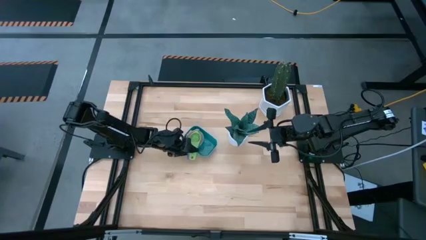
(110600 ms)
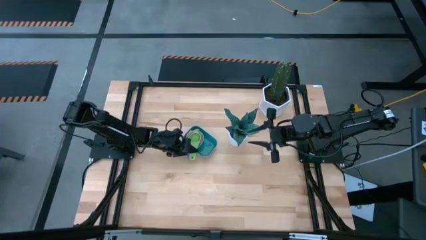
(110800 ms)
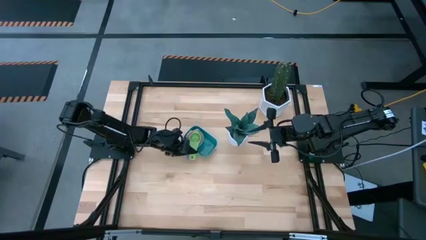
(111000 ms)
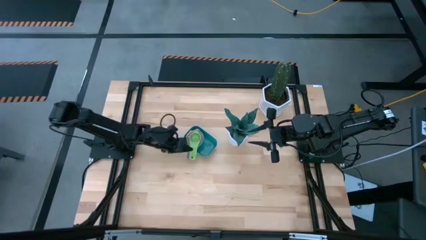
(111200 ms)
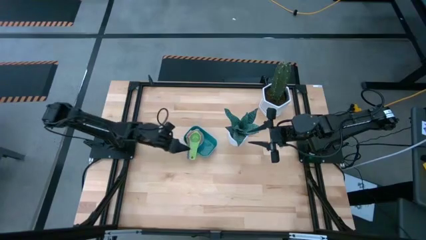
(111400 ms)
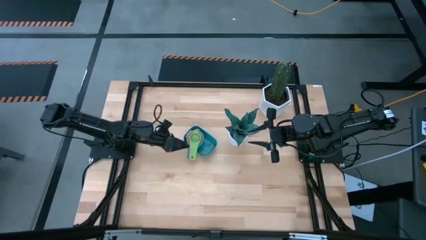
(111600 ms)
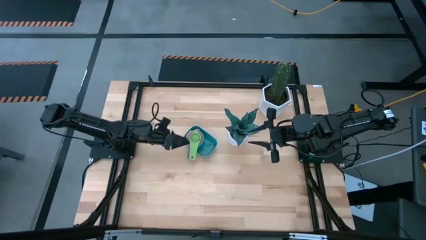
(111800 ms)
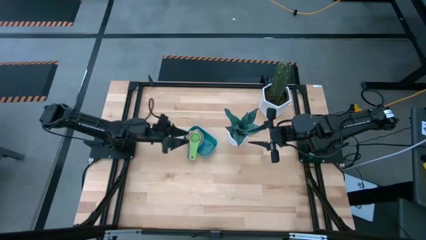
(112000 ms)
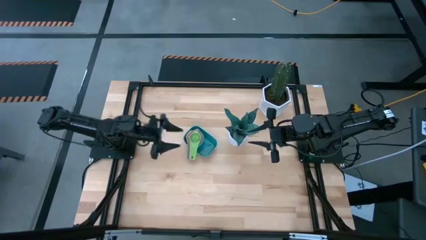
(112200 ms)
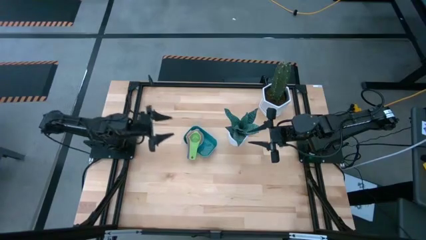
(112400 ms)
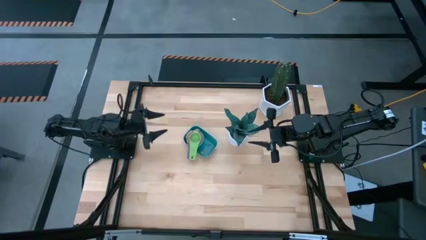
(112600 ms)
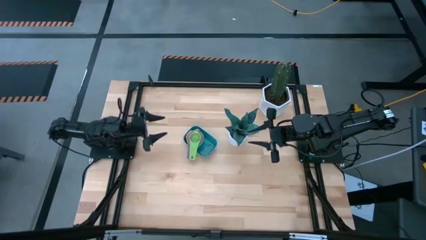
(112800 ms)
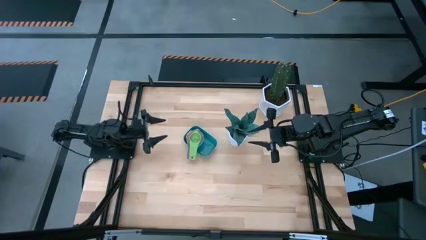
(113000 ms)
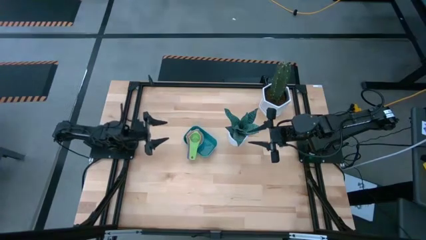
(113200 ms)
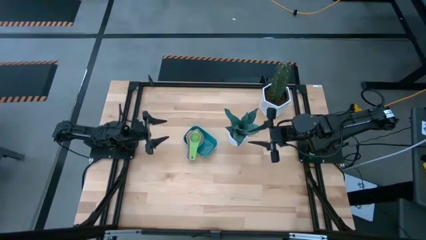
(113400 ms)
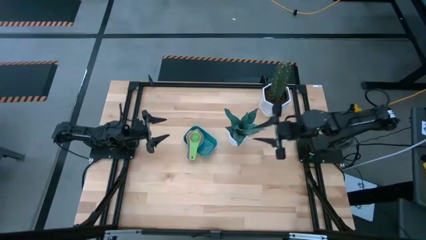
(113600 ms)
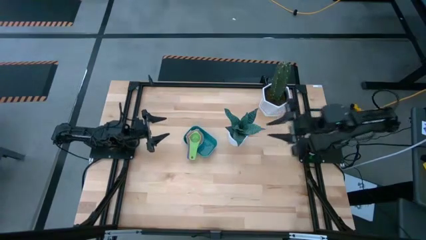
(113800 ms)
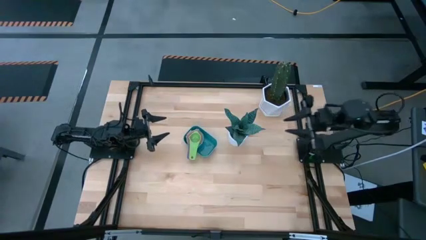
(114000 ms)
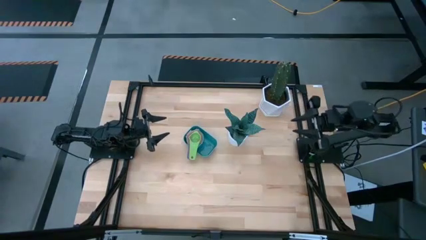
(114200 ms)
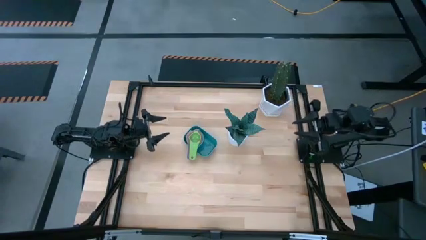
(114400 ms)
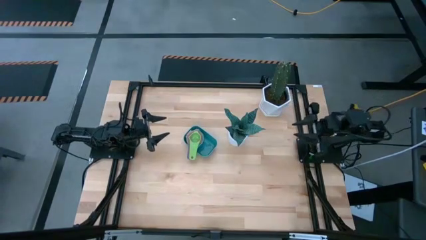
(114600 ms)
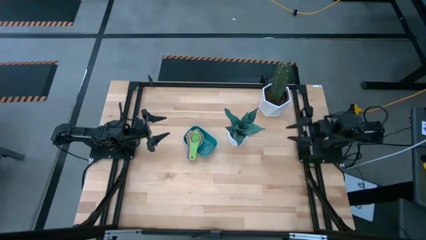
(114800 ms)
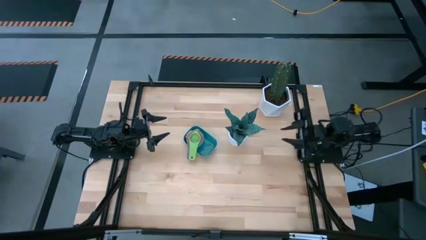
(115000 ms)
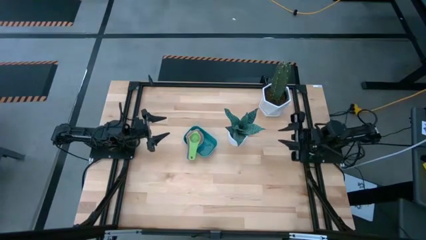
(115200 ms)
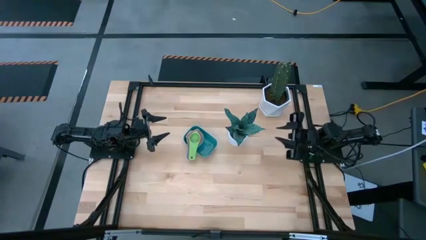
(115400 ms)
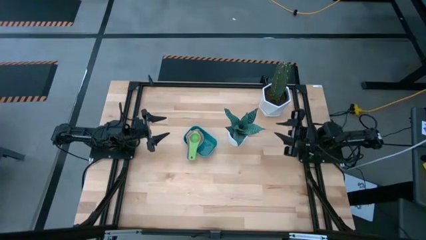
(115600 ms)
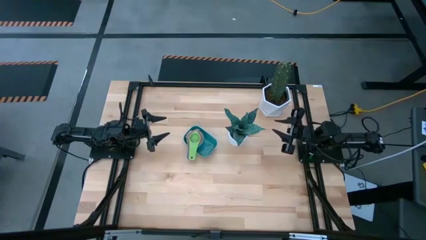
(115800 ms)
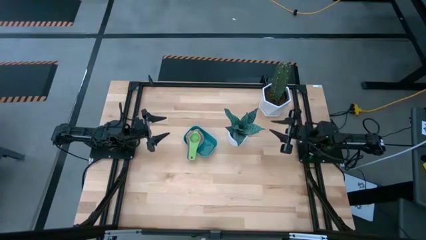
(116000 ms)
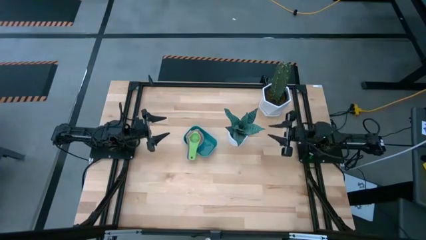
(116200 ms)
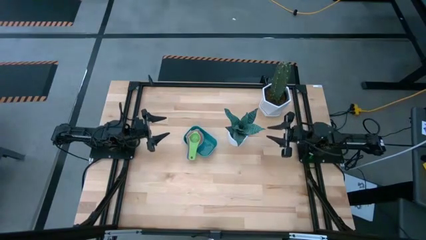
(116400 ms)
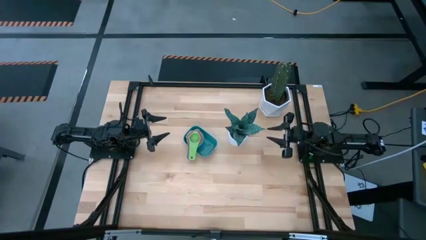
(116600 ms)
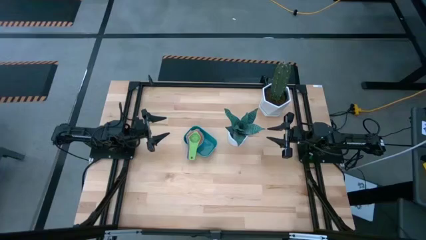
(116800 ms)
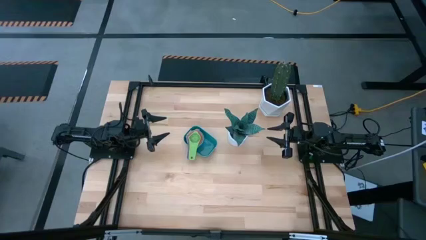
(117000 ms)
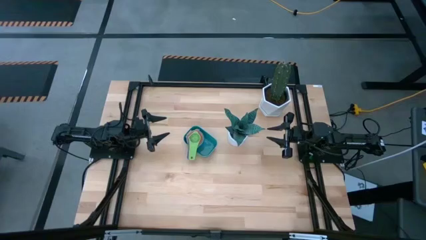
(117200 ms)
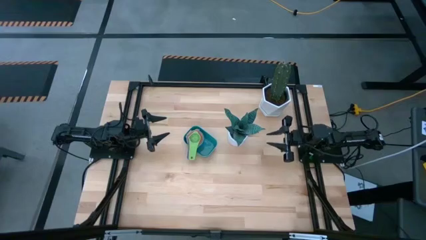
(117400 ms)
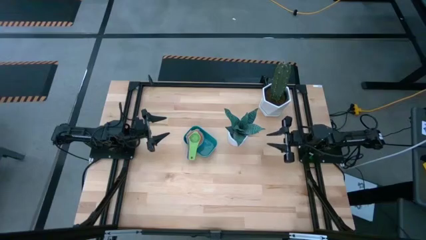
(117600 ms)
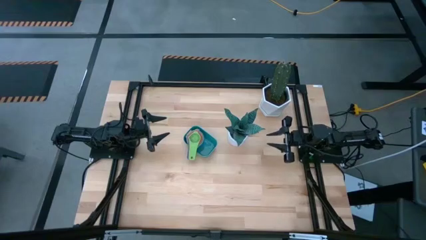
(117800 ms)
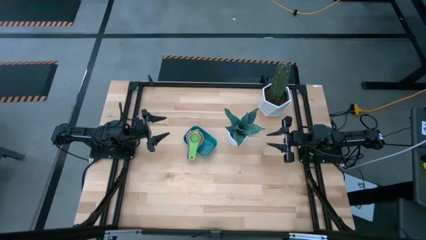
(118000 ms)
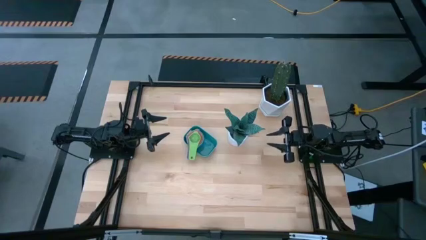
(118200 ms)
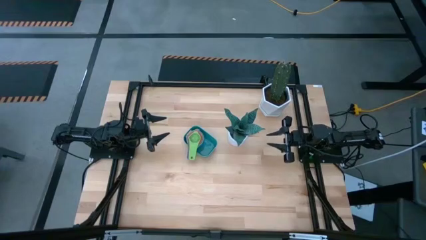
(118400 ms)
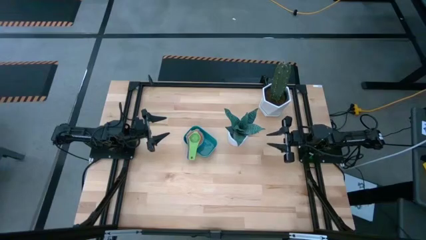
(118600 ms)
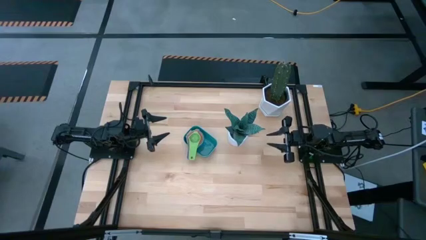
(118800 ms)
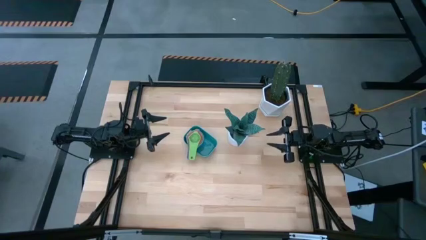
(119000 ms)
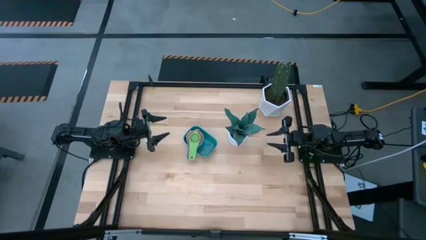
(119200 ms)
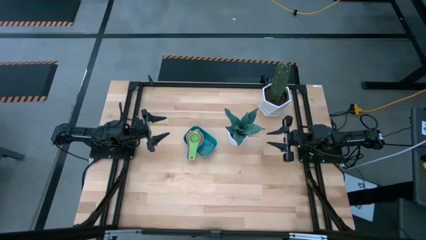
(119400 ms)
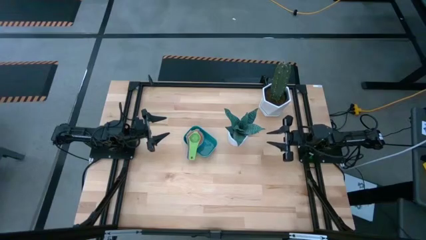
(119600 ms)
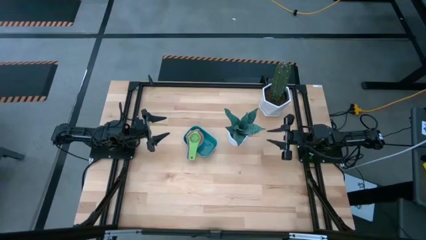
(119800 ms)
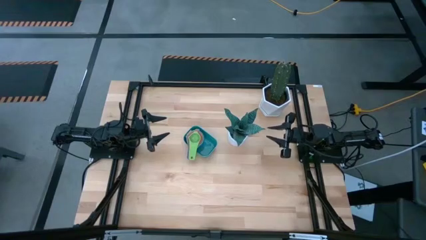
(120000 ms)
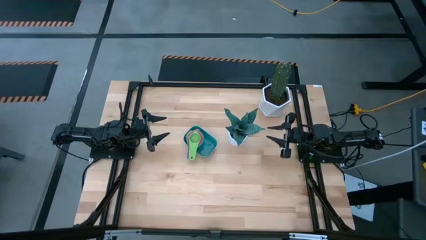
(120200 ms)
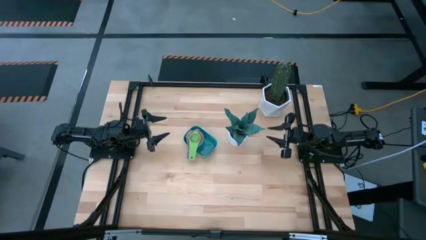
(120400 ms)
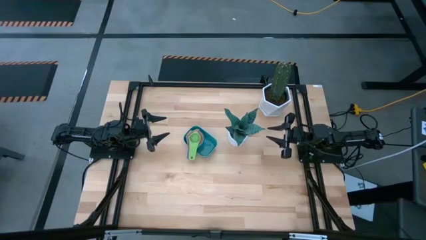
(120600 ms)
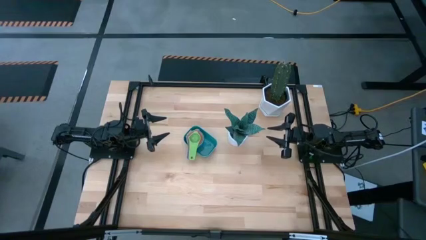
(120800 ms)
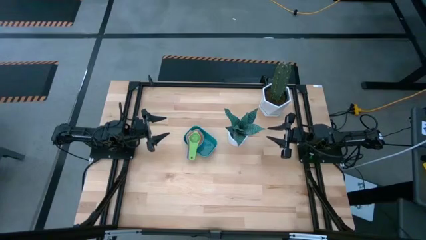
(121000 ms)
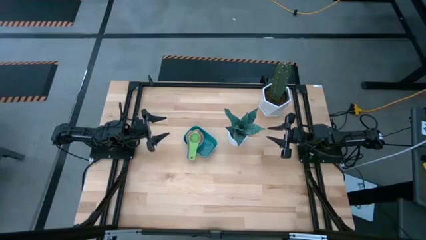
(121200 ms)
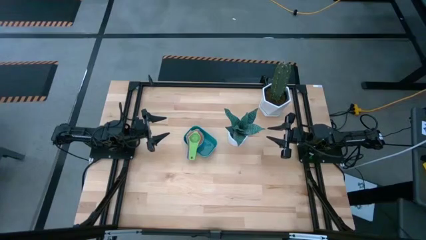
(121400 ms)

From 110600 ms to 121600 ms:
Task: Nest measuring cups in basket
Return to Home Position

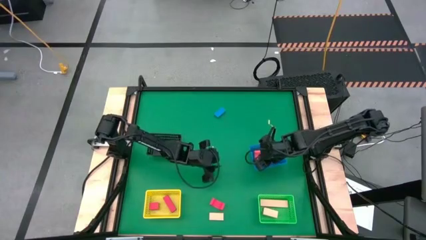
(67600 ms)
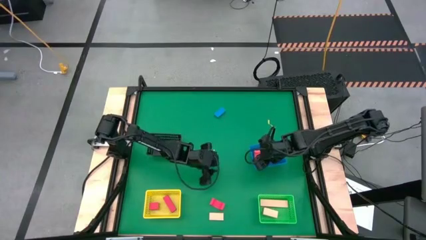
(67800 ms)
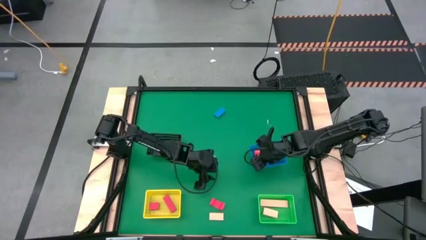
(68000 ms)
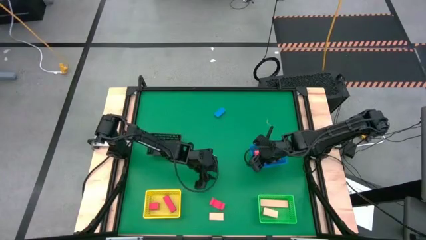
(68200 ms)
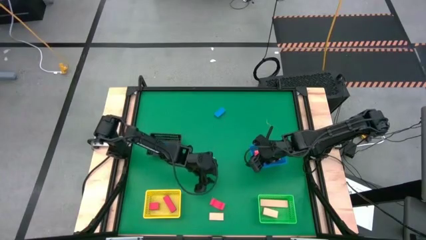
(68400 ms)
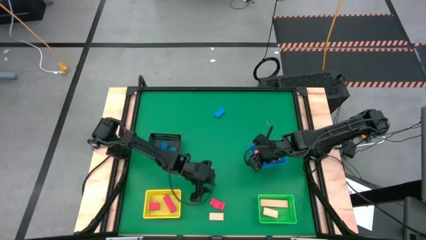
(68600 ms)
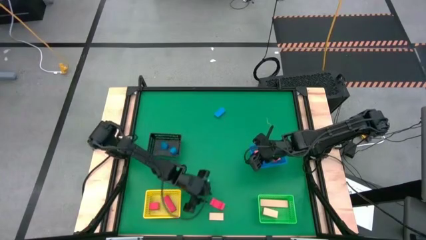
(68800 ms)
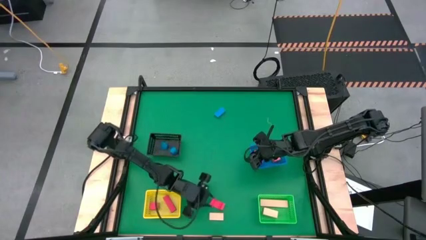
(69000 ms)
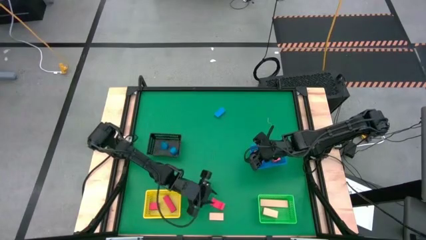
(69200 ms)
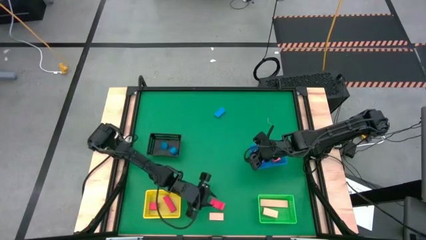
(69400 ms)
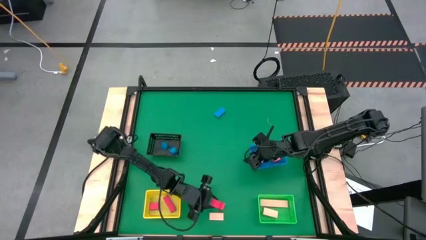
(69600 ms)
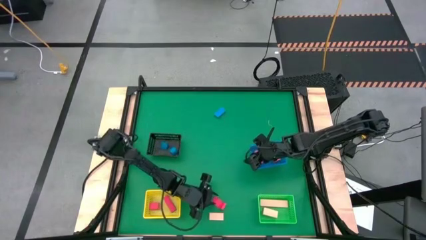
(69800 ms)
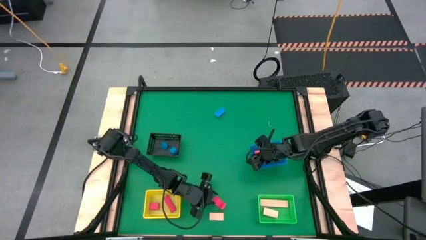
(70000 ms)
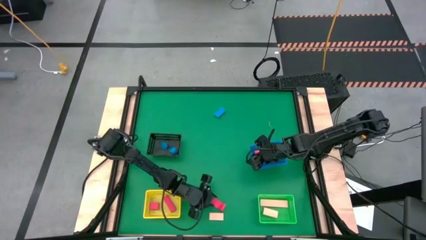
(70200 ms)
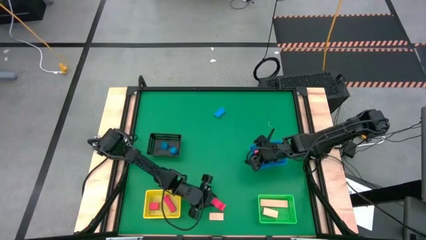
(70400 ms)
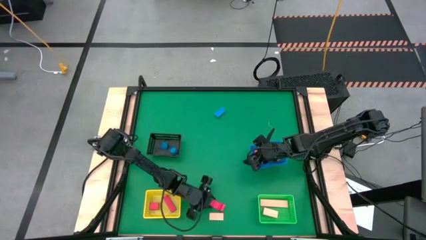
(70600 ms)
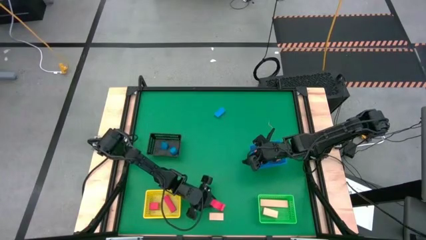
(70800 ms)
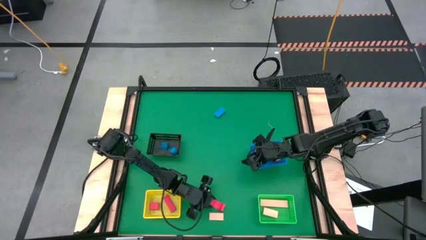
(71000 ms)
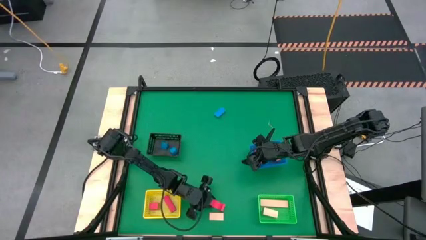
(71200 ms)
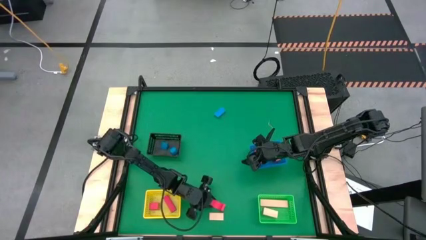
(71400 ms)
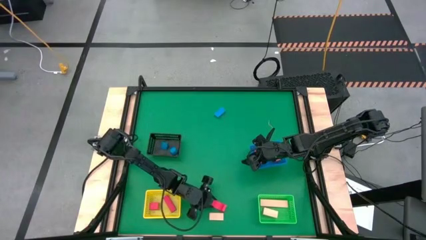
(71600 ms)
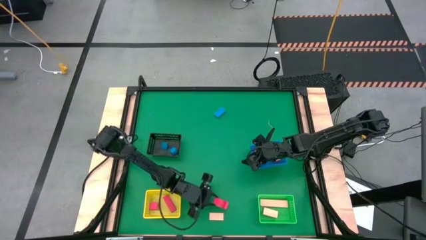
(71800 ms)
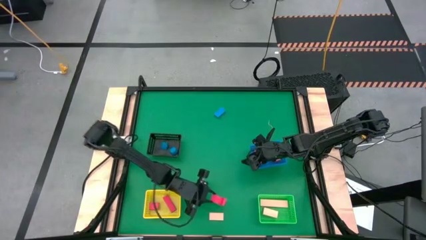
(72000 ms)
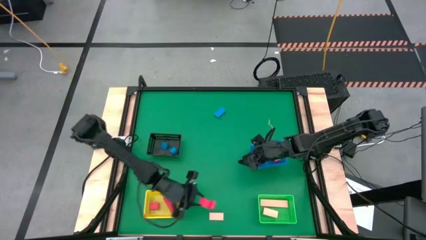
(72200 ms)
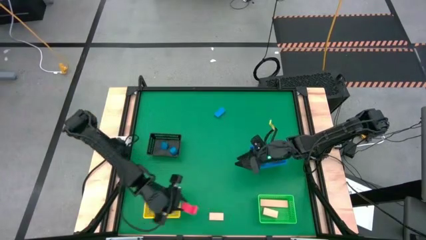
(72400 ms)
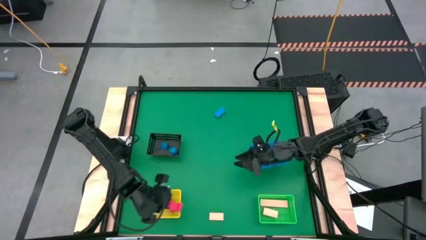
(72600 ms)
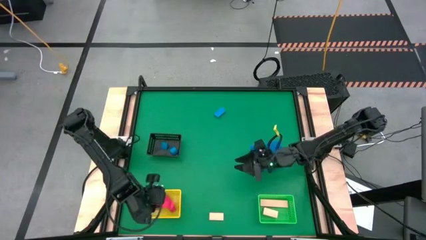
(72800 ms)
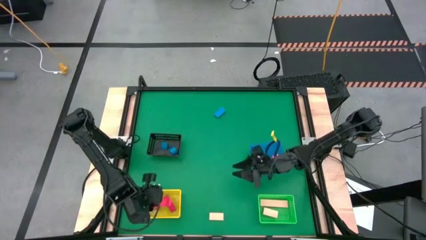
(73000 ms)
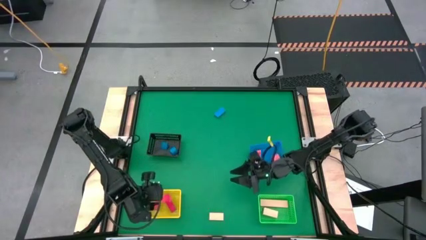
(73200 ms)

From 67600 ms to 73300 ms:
Task: Sort & place blocks by color
Put the red block into the yellow bin
